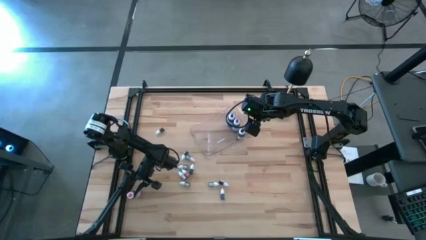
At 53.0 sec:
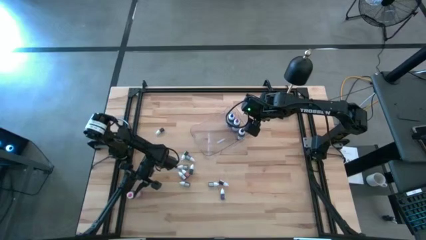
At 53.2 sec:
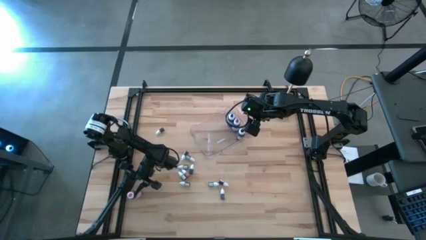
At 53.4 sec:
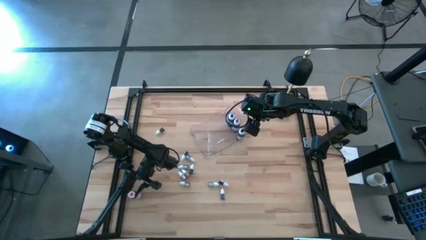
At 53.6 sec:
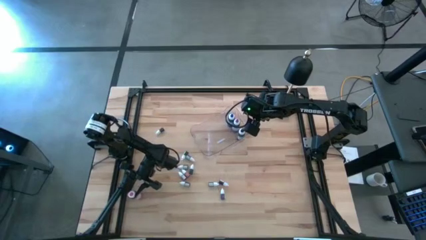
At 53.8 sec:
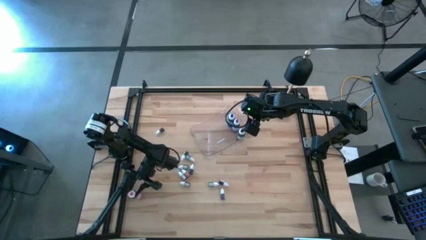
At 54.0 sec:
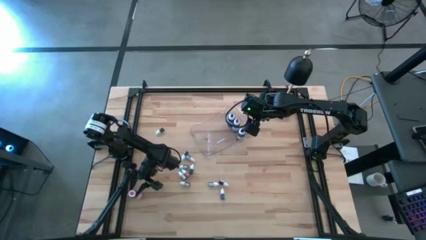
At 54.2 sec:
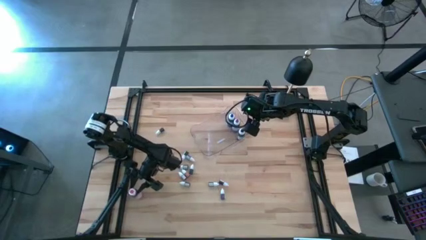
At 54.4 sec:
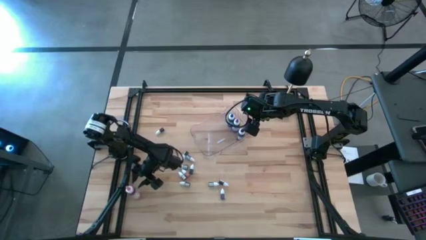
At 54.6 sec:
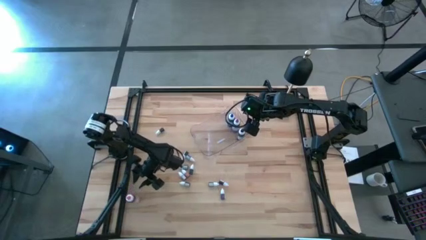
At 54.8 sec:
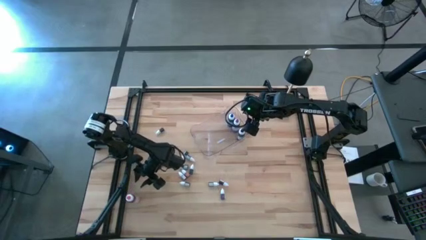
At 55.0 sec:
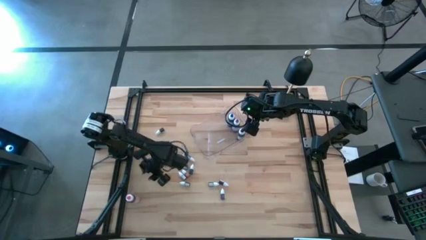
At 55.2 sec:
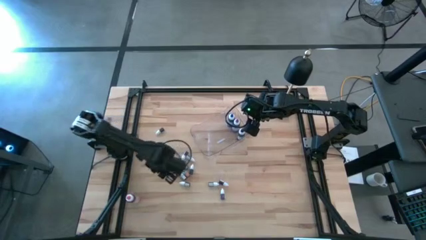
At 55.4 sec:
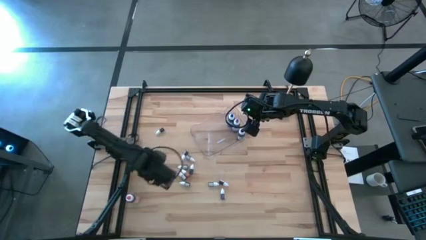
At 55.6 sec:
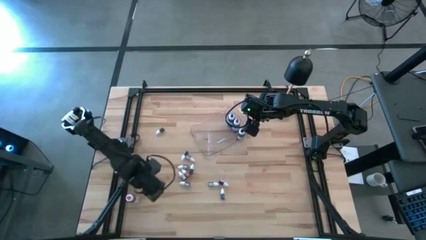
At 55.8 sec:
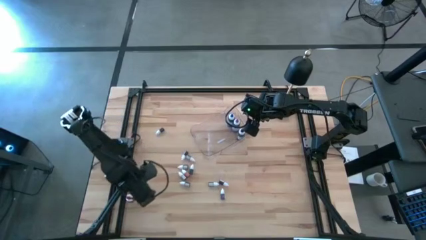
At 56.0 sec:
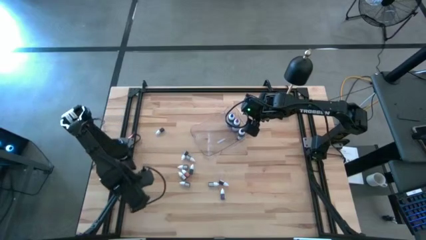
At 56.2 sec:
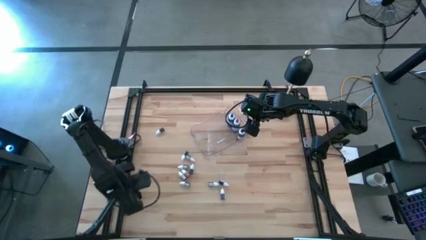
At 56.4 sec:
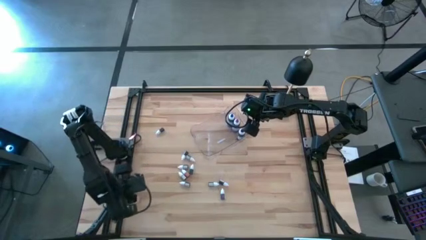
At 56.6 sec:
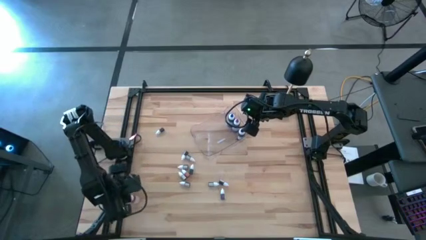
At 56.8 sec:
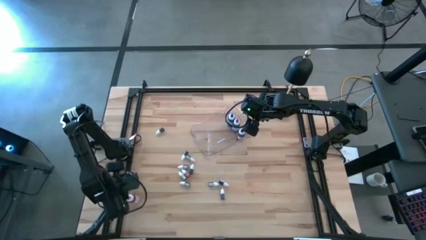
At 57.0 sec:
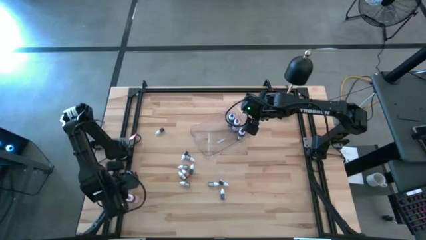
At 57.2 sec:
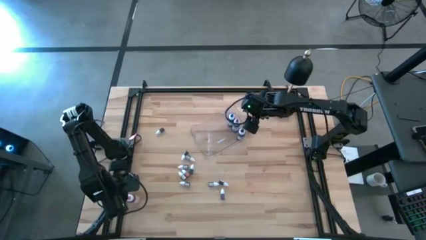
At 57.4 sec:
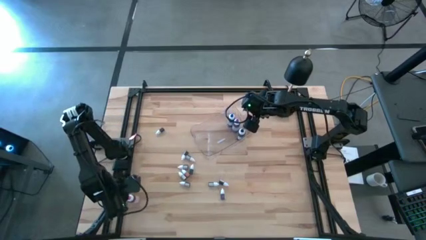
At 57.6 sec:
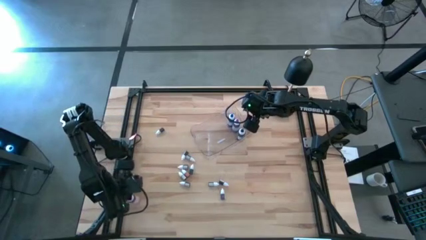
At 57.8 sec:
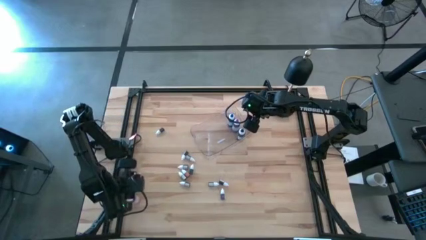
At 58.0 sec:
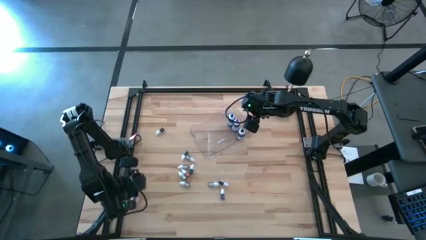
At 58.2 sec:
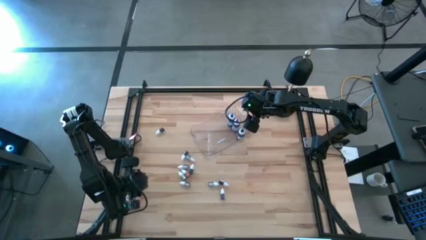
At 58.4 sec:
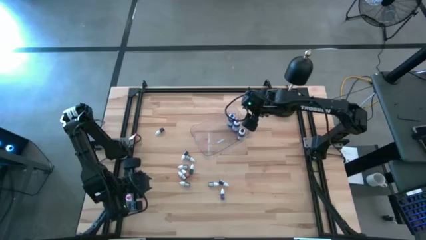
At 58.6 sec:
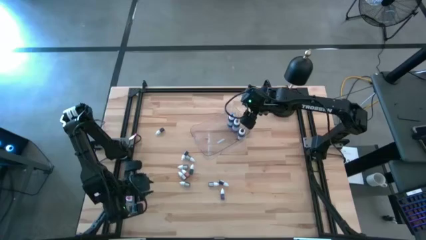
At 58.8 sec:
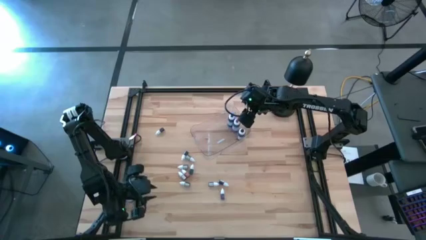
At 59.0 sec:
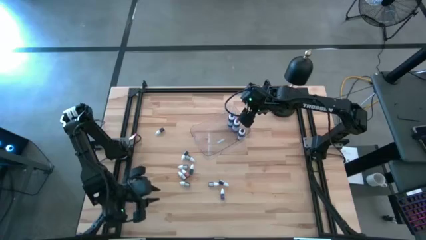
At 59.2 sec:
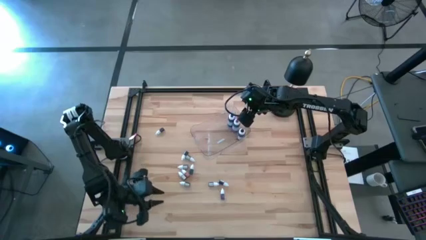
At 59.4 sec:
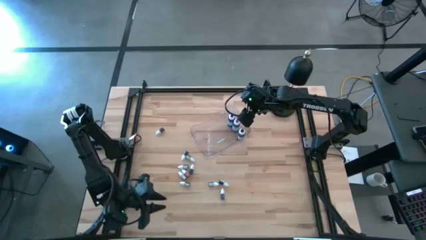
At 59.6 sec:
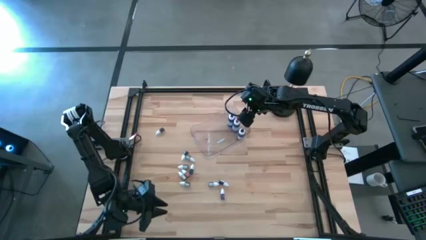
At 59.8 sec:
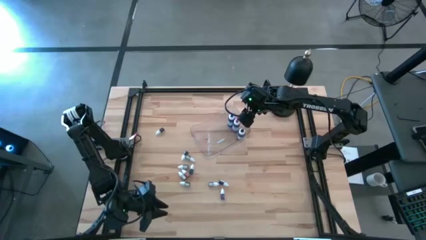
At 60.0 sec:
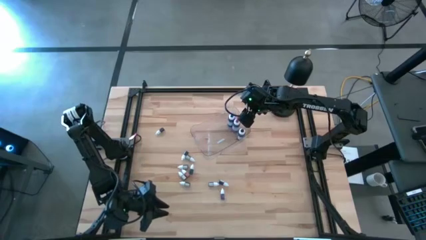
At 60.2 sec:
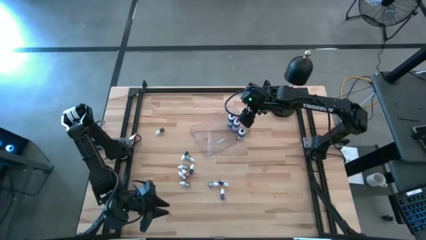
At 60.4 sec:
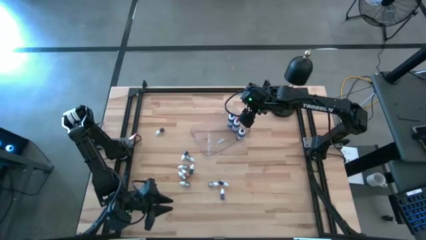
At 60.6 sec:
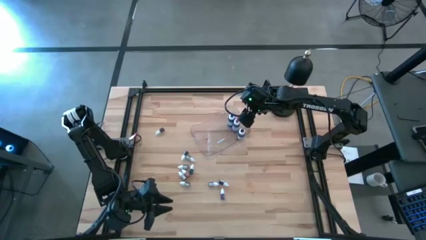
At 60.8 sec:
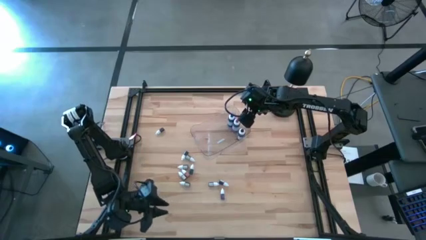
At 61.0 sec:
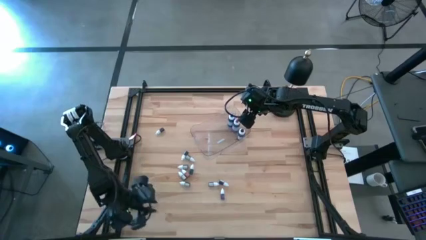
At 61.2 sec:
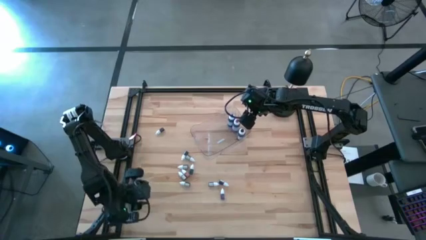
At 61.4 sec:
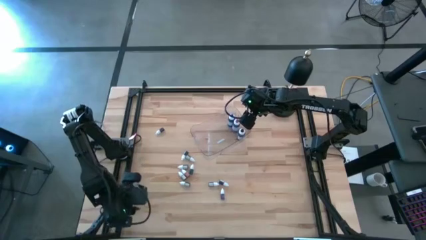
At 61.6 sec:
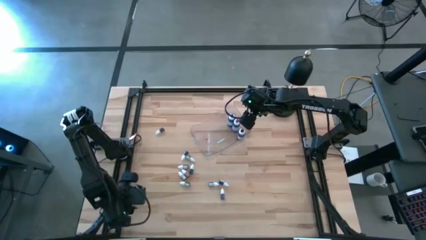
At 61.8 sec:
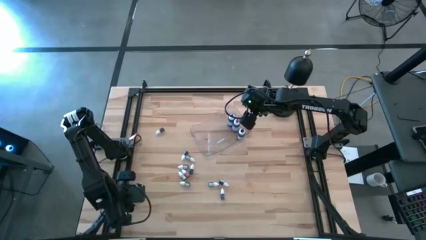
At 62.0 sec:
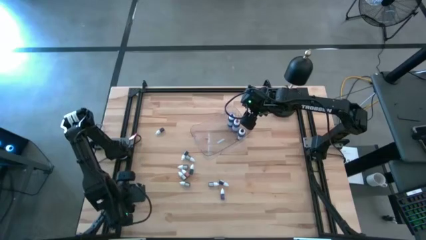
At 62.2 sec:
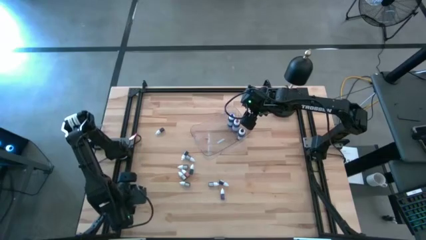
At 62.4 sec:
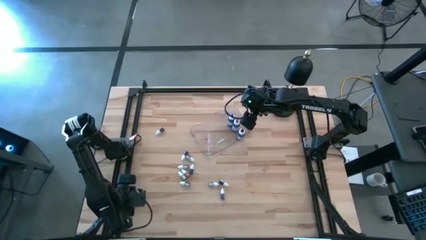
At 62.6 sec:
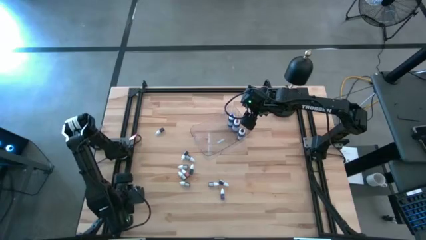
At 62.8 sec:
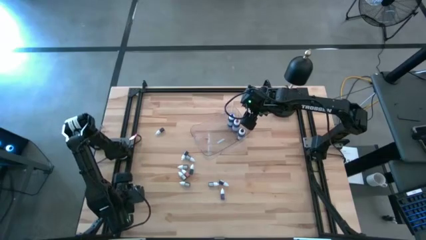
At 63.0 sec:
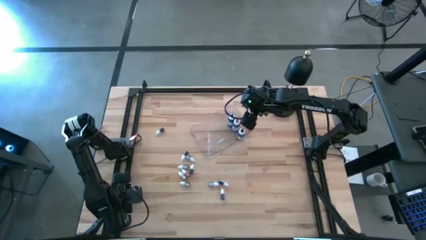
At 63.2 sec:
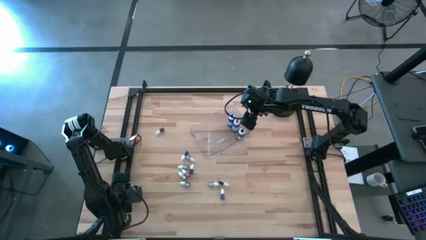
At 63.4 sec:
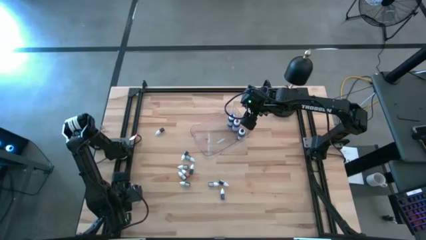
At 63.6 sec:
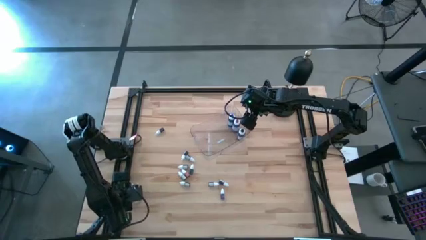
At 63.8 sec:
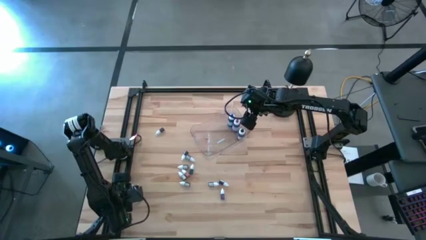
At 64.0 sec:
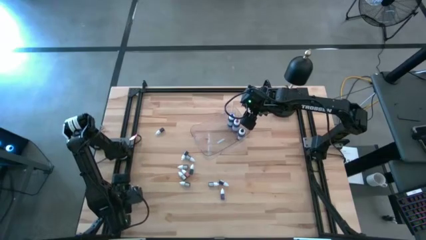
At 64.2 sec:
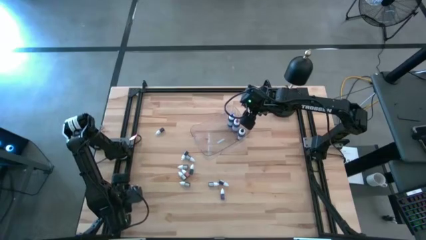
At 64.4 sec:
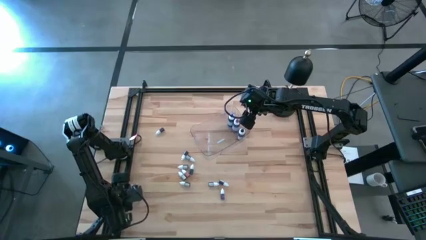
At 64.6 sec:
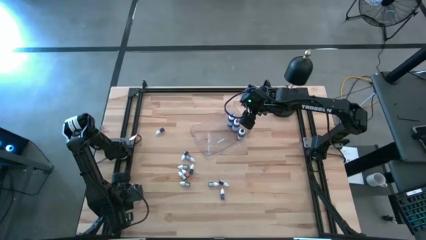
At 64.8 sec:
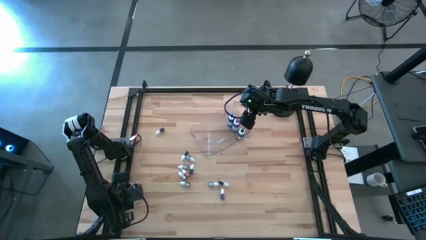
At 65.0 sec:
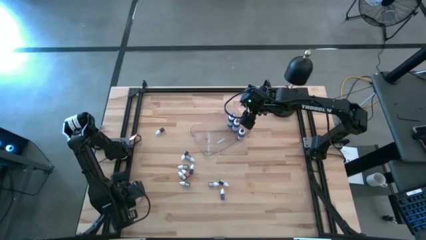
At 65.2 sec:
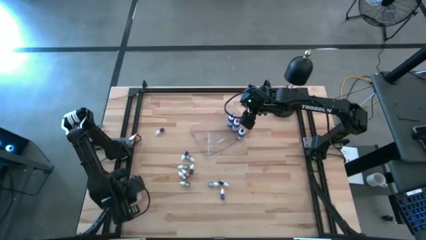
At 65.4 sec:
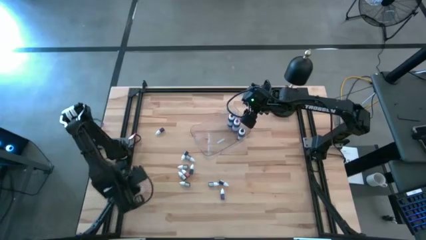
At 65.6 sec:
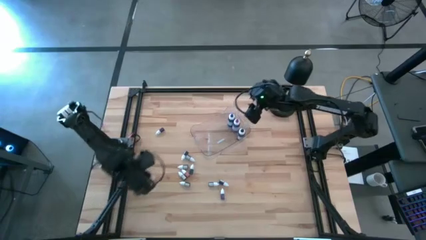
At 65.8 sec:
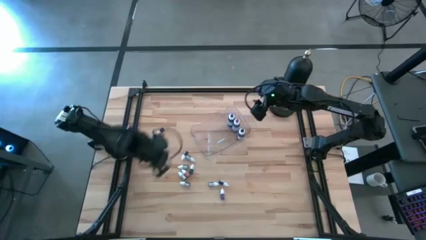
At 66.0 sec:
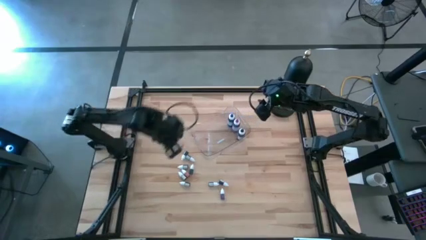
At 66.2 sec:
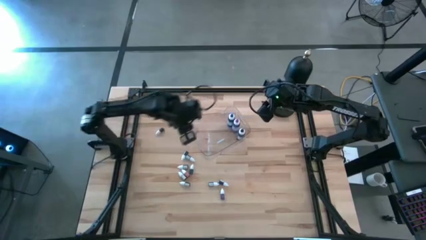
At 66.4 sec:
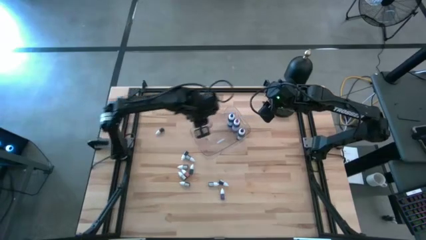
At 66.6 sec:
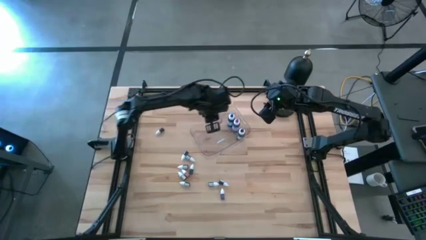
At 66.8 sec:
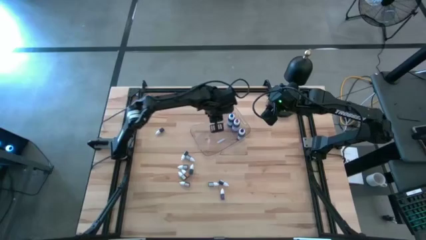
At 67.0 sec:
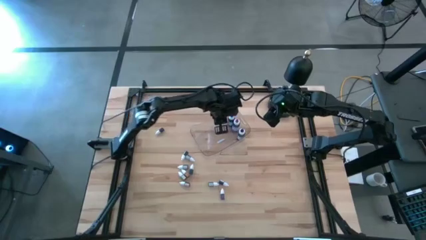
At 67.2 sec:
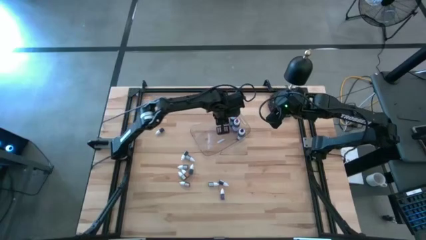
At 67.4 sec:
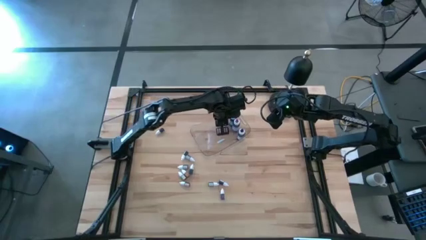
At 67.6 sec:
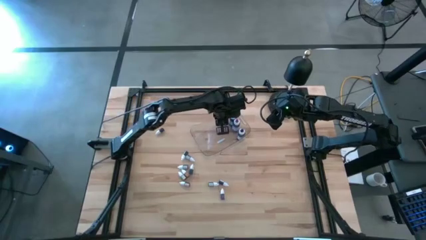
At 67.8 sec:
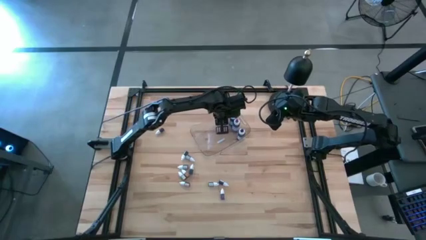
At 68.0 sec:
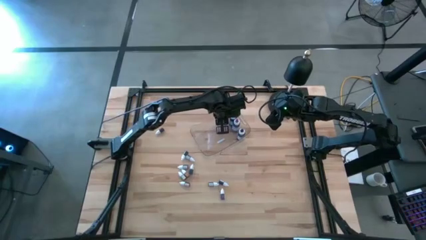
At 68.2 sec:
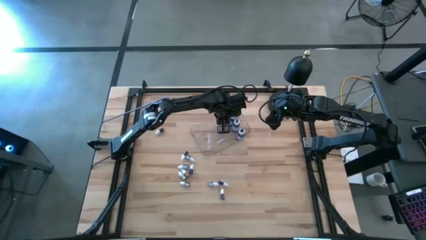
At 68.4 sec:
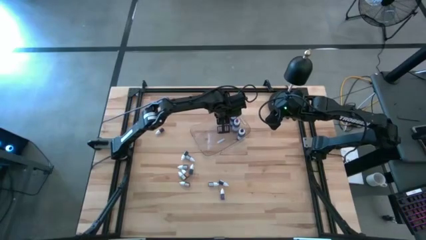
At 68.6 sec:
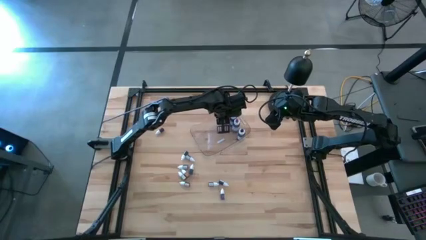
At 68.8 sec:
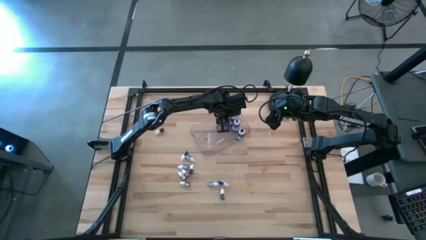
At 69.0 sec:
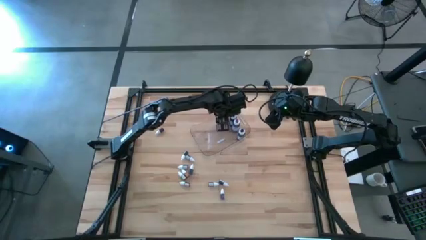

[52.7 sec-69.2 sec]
Task: Pick & Place food coloring
Put the big pink food coloring bottle into the transparent bin
